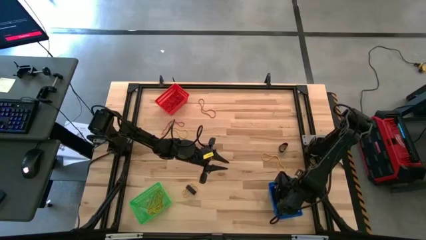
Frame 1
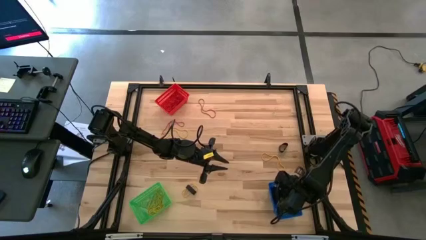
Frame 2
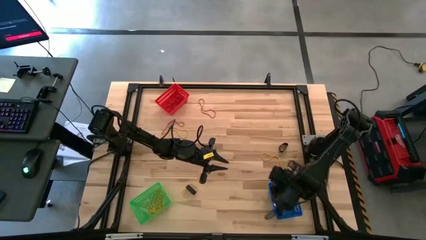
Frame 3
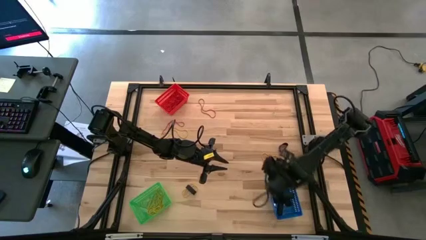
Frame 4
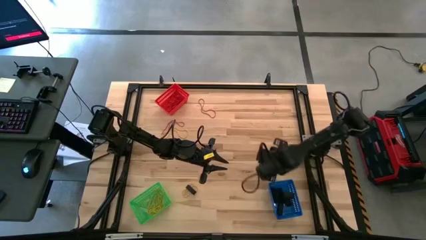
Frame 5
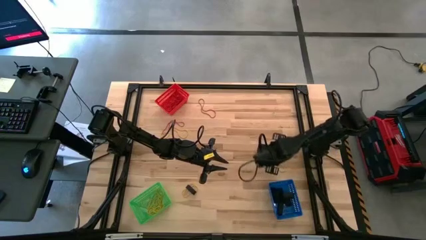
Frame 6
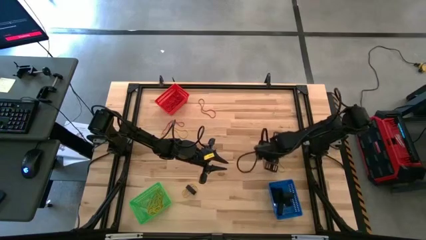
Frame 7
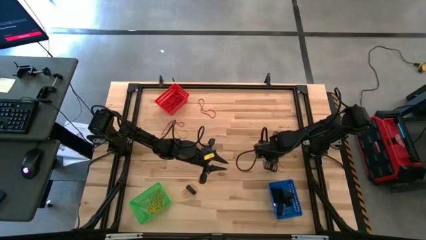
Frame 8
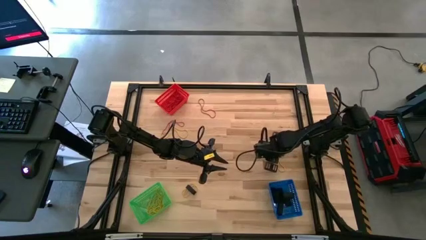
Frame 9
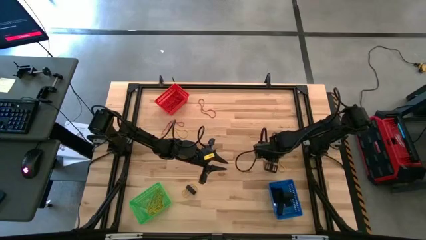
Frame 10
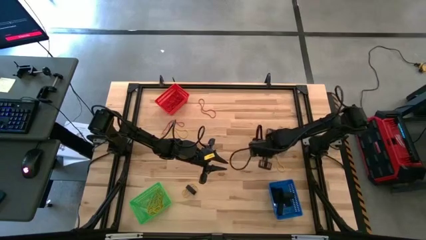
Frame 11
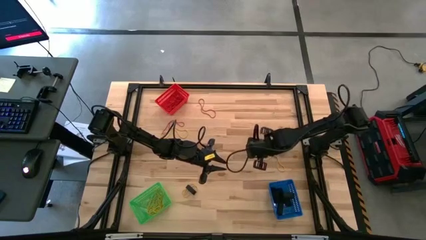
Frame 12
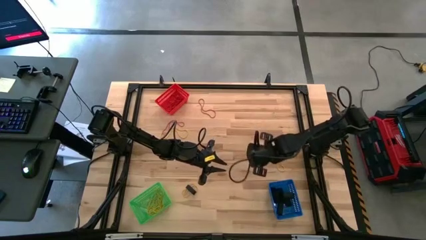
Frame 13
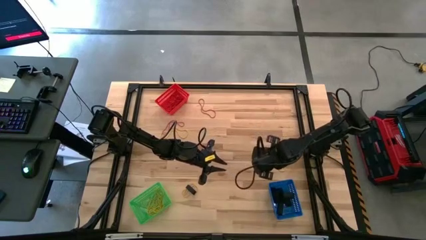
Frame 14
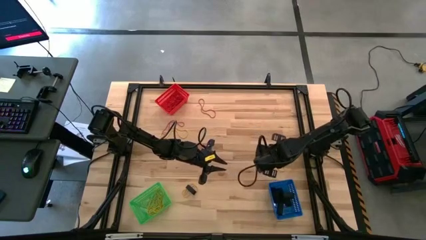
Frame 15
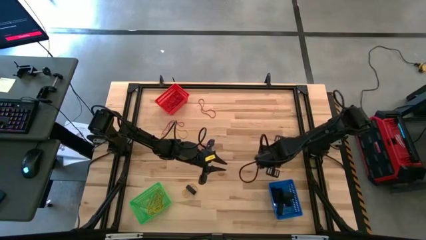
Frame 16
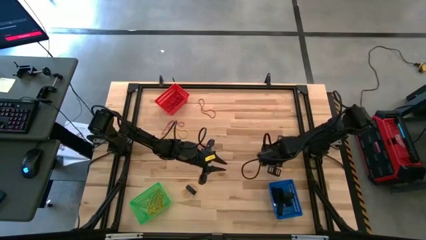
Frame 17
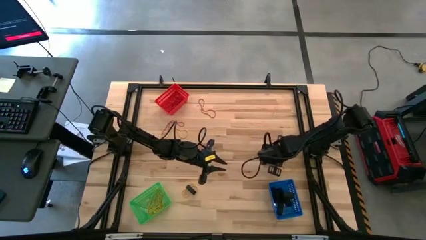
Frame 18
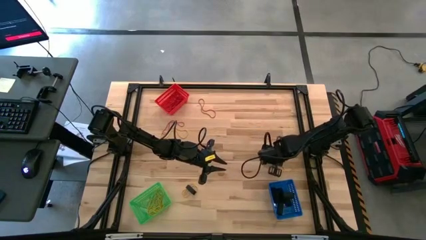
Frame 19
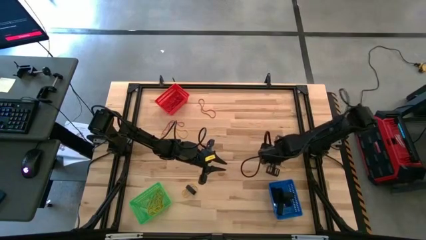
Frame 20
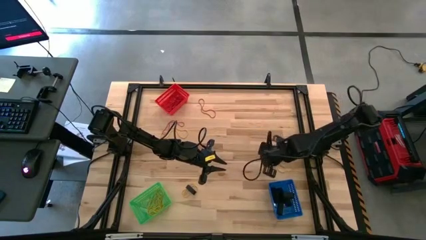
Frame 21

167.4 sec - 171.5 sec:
Task: Sort rubber bands into baskets
Put the yellow rubber band into the green basket

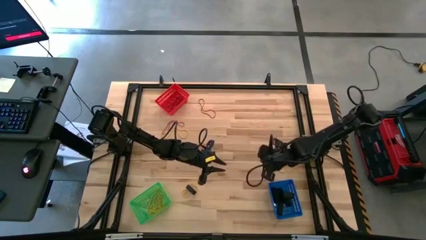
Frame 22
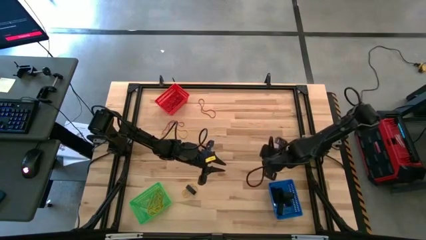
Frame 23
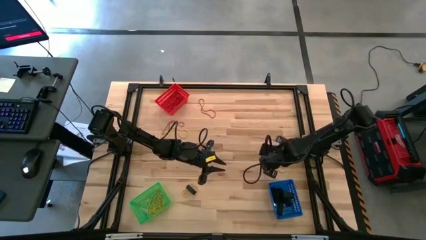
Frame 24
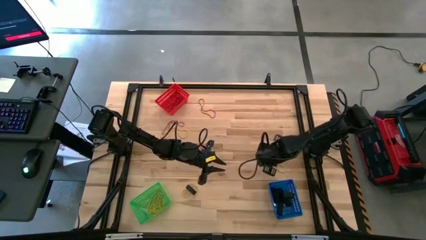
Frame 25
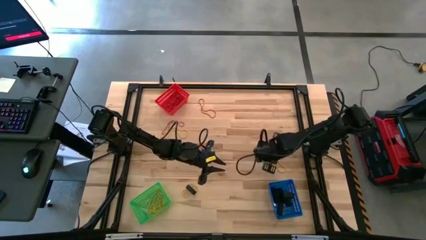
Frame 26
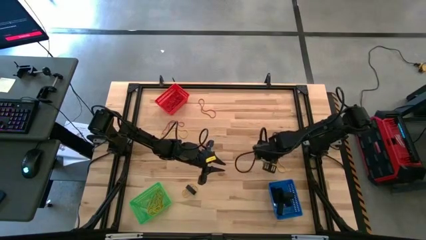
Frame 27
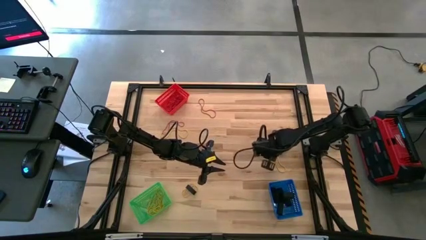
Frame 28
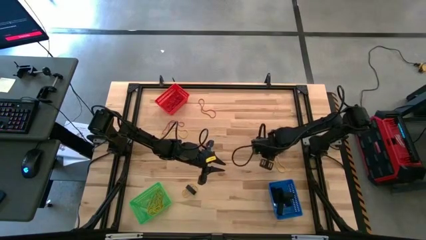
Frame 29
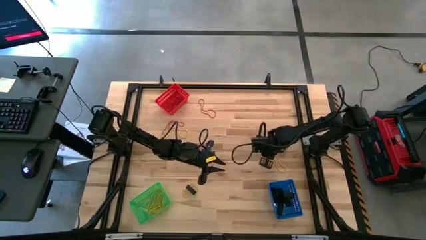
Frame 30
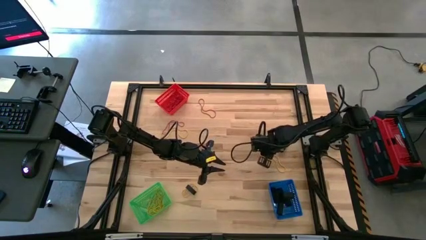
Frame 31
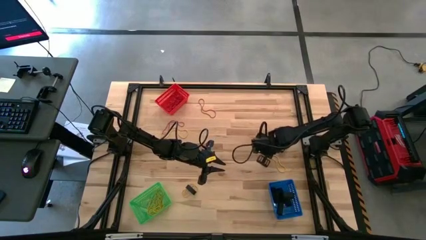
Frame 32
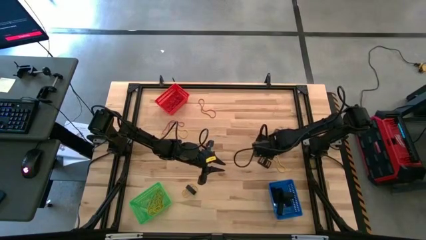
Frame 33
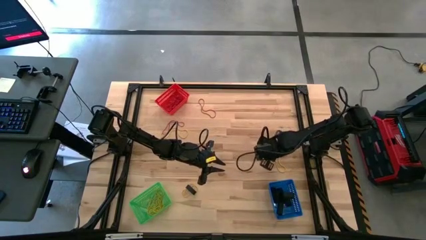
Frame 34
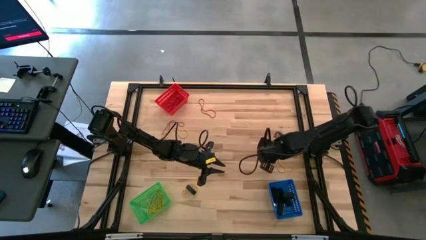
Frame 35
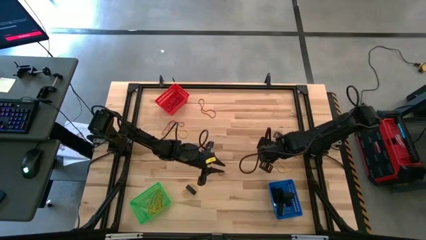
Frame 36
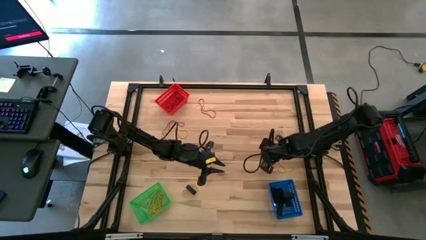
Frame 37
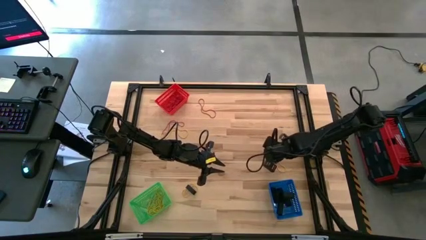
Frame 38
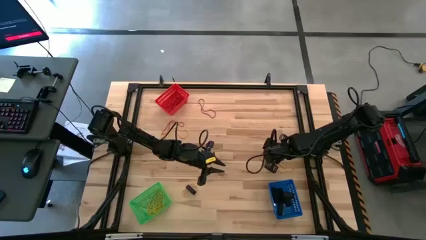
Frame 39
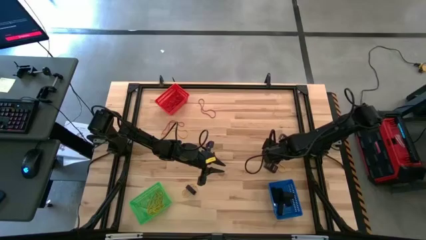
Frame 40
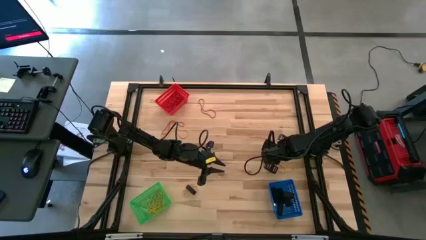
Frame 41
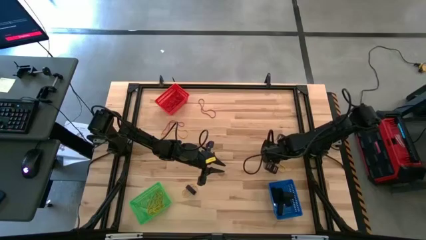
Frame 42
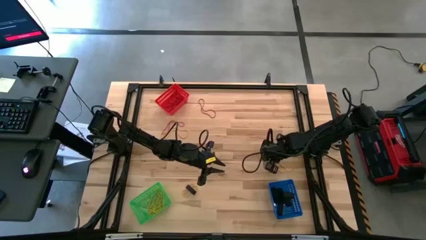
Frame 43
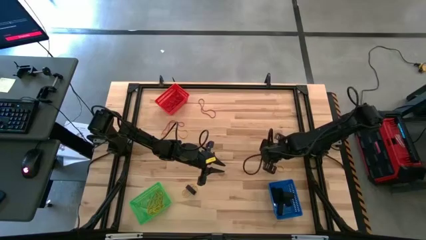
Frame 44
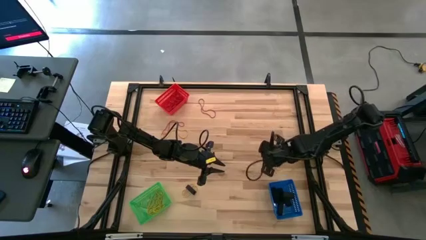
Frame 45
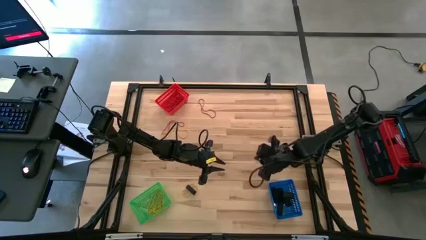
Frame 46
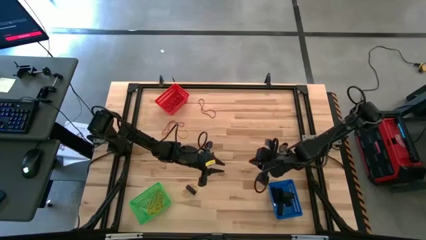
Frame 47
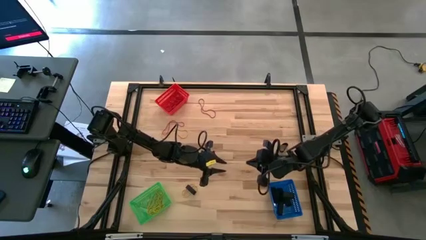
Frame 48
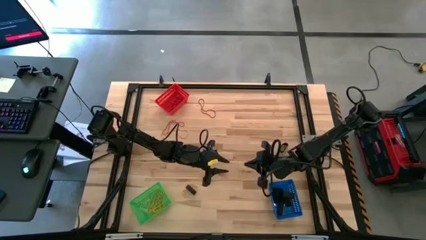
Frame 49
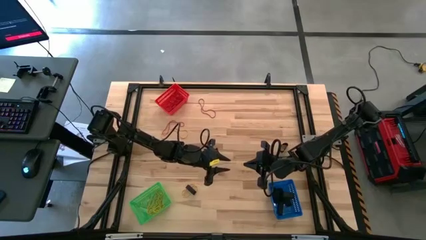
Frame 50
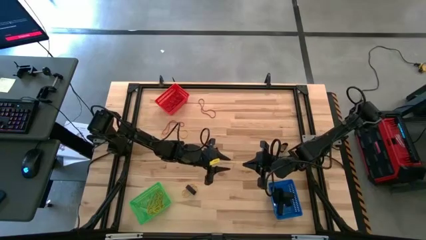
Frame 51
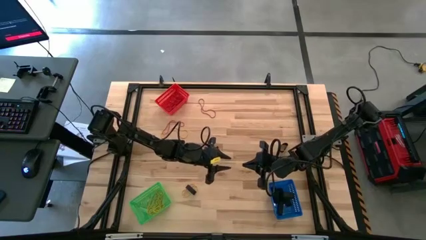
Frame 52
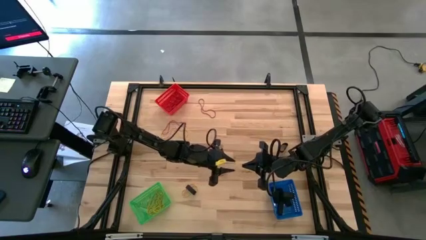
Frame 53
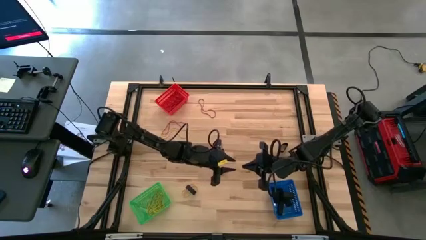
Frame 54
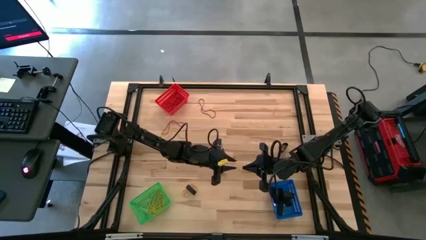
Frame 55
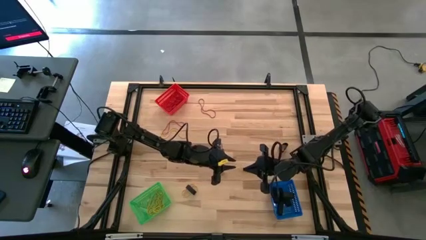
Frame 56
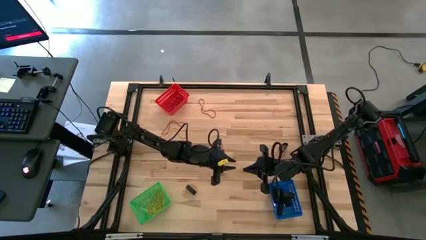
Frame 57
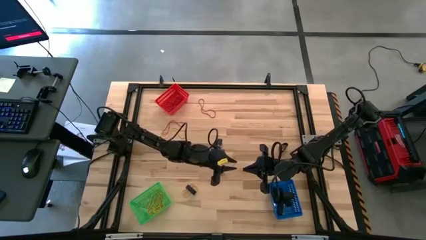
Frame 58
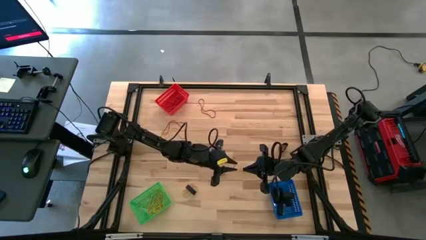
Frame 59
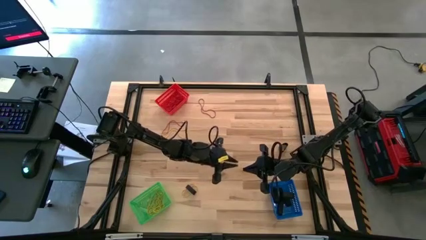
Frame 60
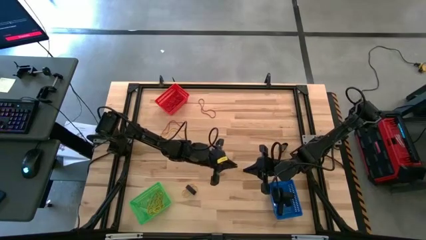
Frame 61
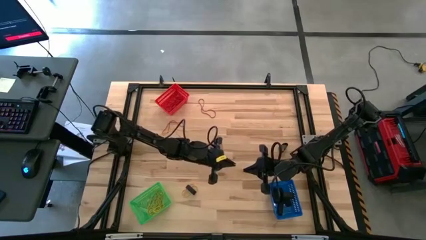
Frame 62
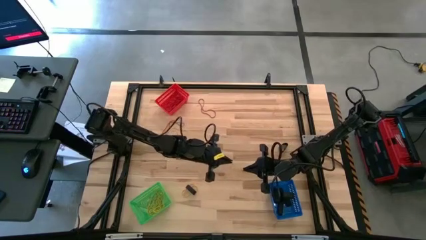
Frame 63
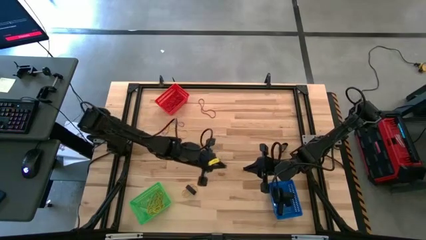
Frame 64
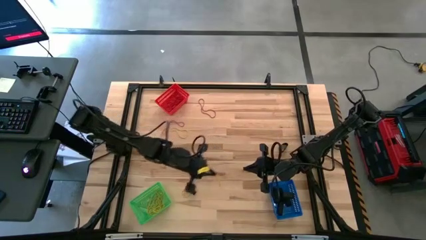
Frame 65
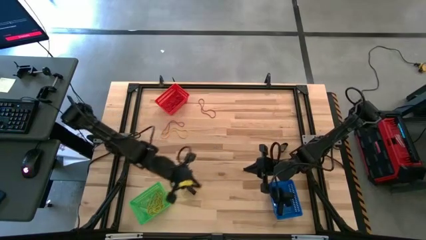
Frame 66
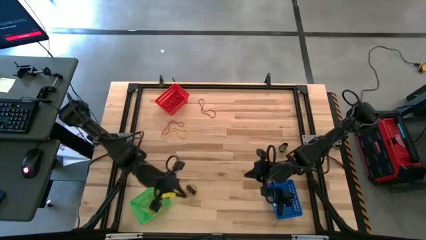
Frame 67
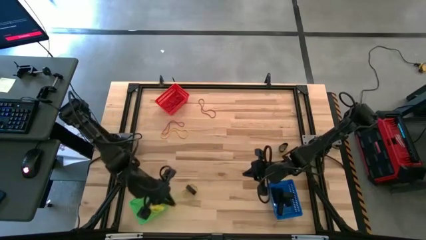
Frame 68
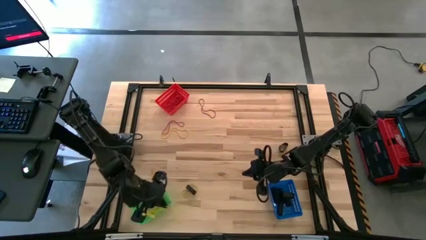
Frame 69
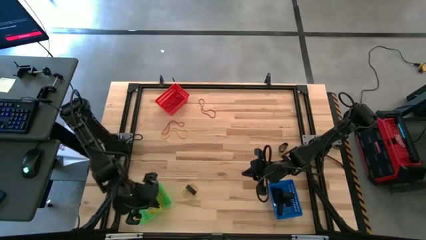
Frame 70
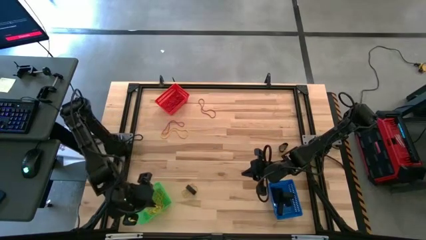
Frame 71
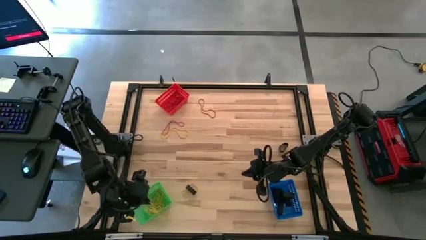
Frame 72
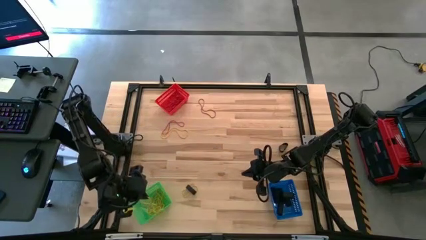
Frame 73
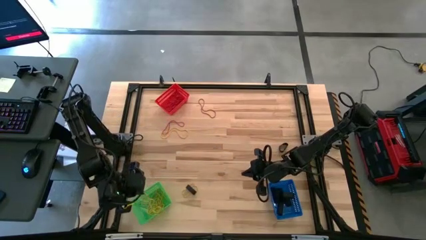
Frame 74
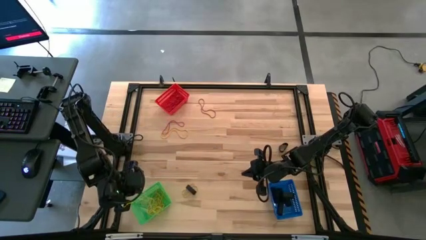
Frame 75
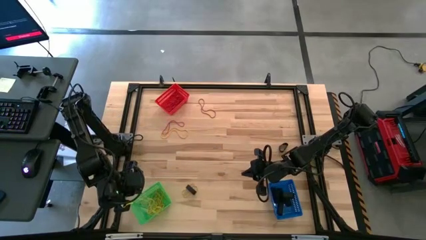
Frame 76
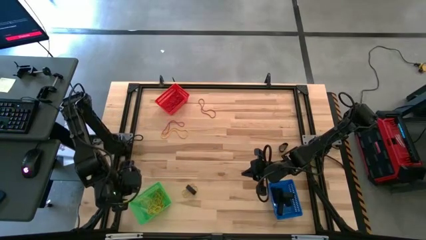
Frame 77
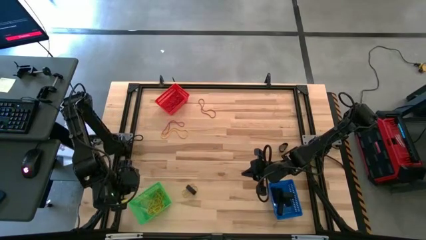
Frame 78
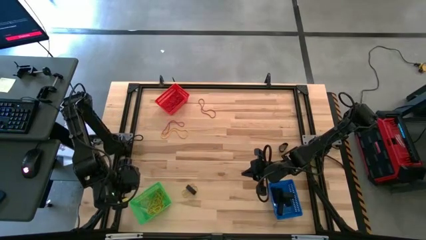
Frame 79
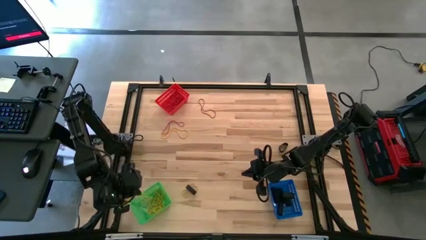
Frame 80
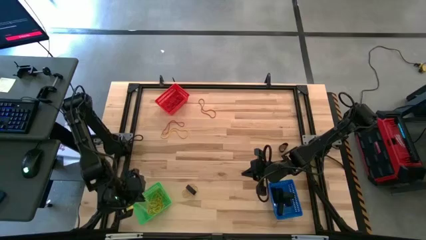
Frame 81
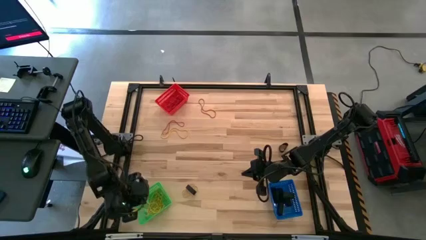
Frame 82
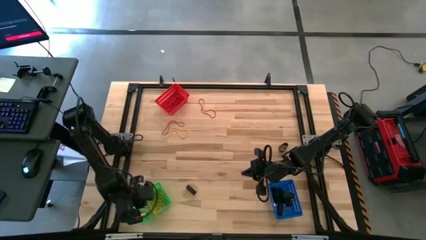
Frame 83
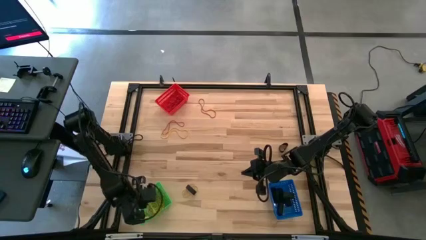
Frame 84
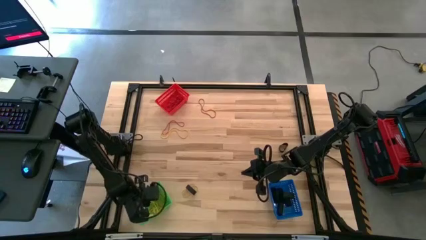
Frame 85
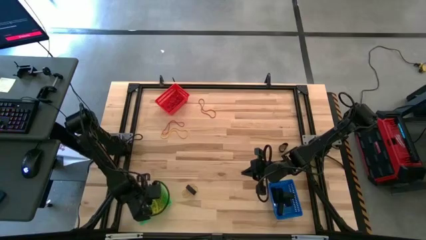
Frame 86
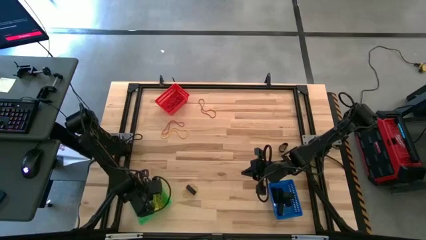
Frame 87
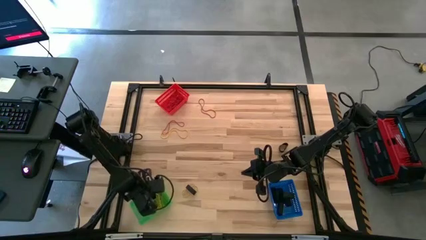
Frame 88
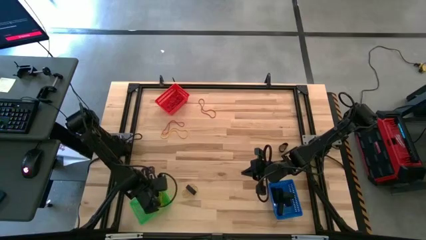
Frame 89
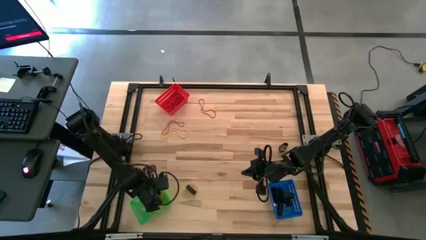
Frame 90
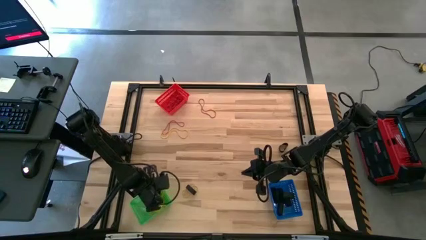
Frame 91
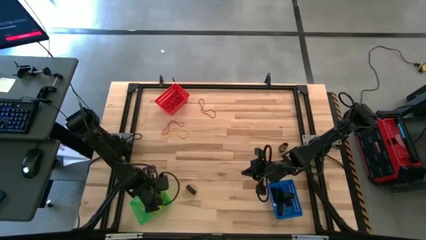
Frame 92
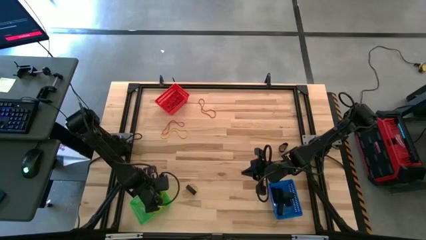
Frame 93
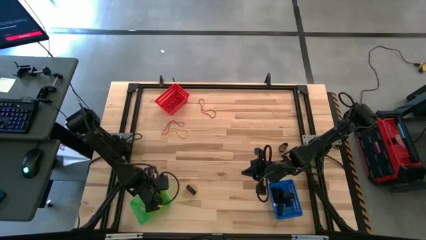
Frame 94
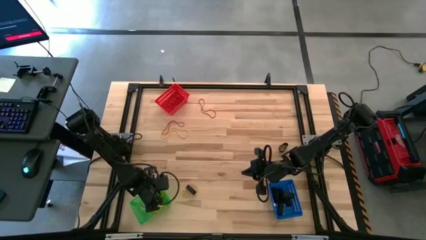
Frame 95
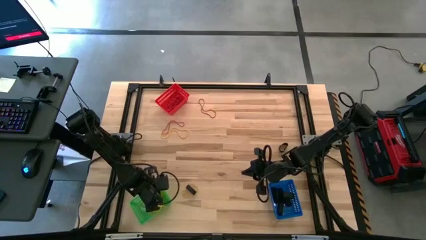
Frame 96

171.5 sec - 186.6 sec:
Put the yellow rubber band into the green basket
